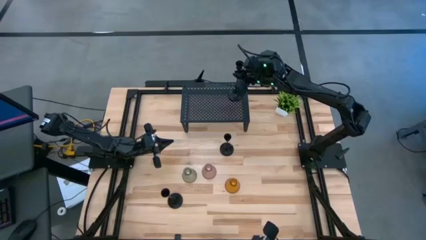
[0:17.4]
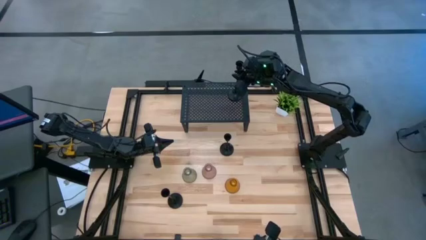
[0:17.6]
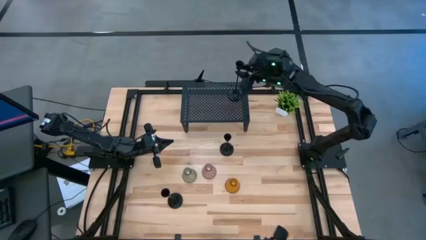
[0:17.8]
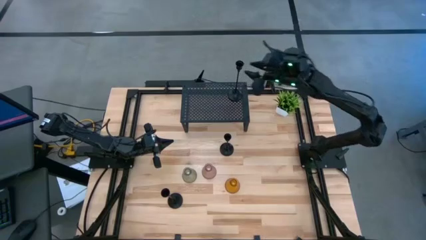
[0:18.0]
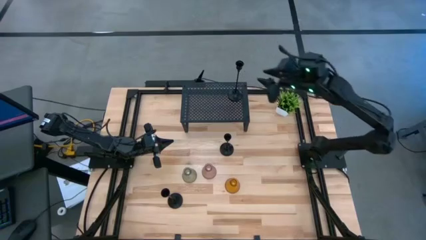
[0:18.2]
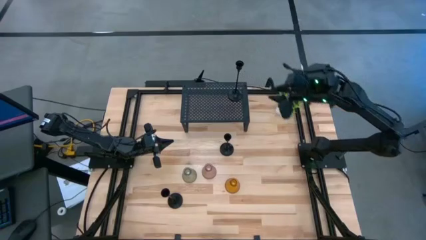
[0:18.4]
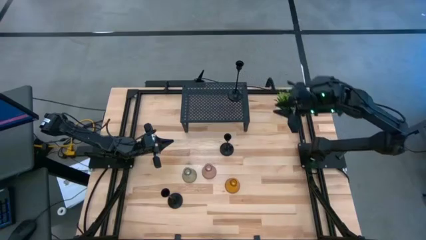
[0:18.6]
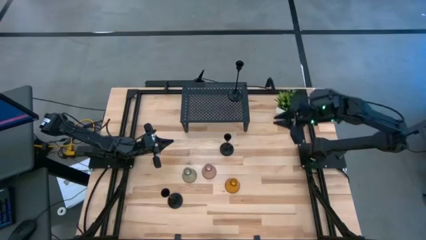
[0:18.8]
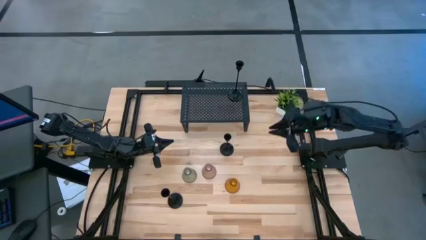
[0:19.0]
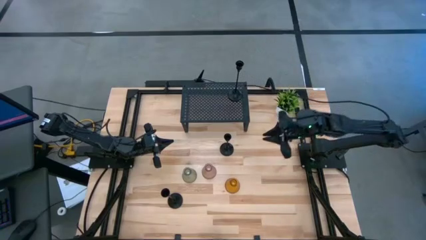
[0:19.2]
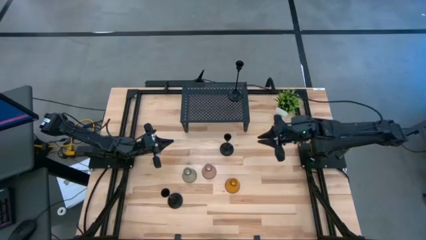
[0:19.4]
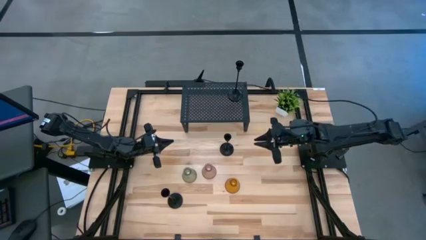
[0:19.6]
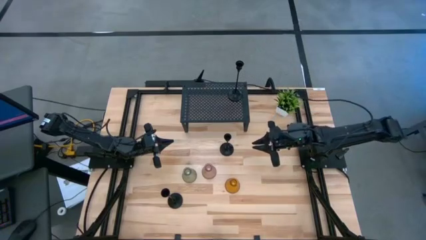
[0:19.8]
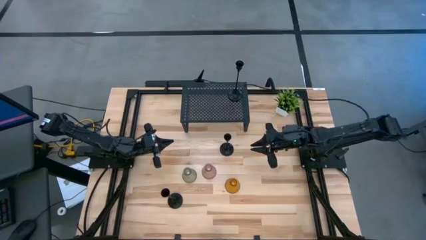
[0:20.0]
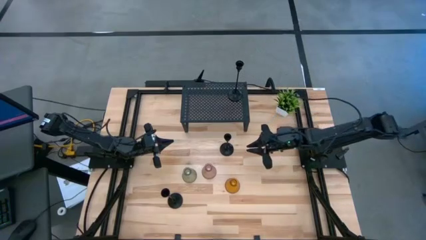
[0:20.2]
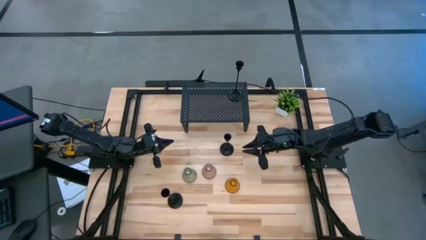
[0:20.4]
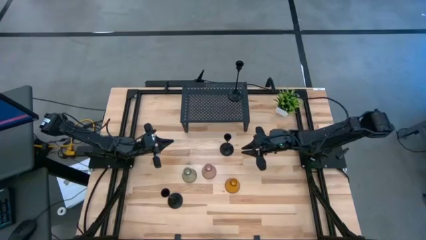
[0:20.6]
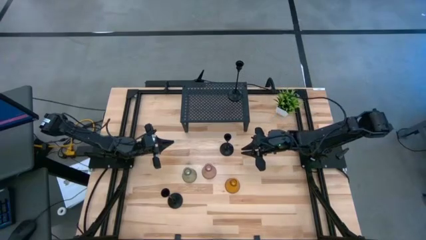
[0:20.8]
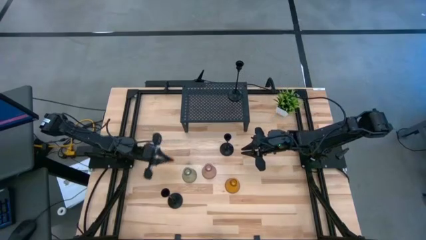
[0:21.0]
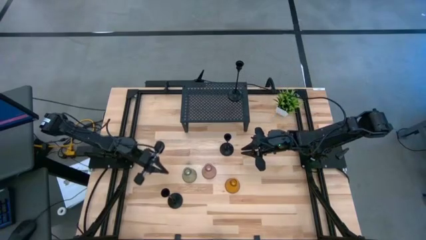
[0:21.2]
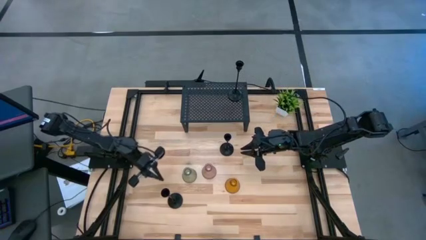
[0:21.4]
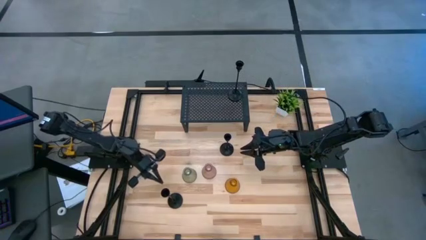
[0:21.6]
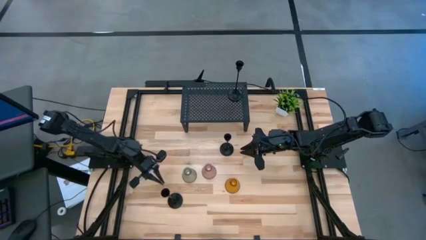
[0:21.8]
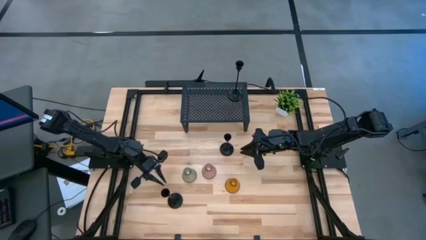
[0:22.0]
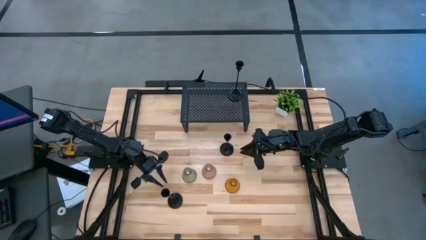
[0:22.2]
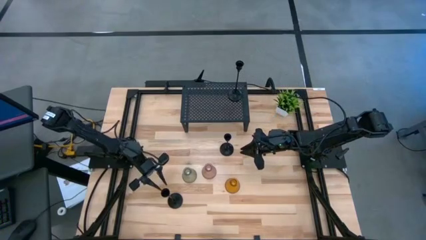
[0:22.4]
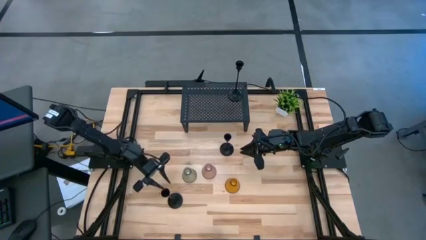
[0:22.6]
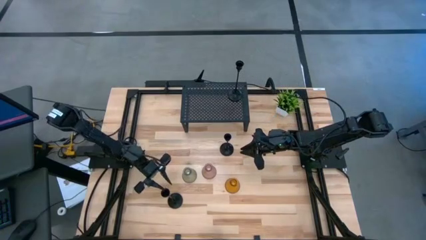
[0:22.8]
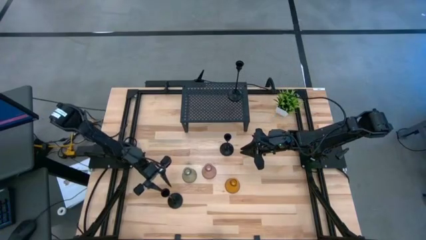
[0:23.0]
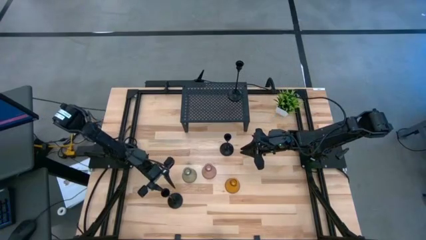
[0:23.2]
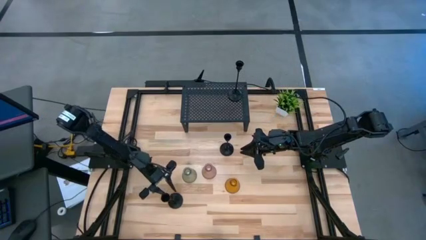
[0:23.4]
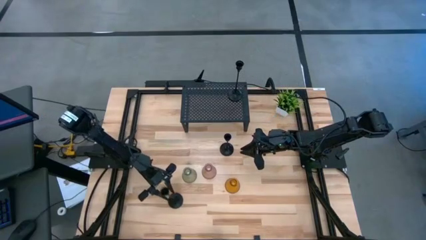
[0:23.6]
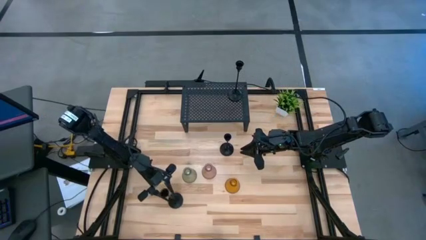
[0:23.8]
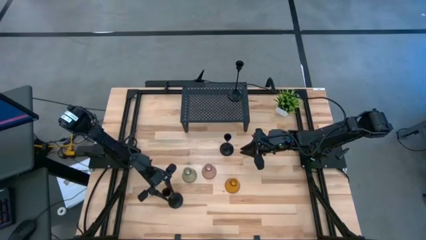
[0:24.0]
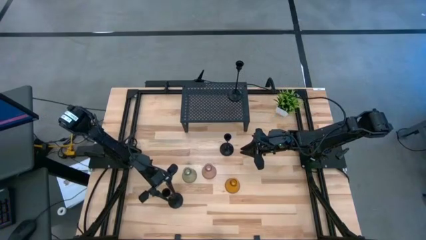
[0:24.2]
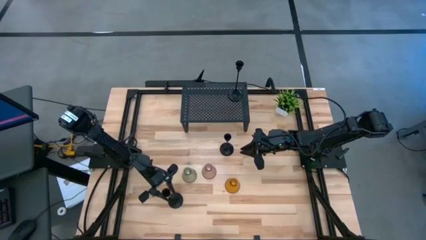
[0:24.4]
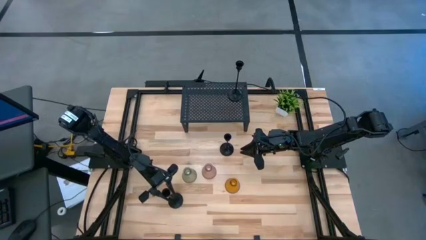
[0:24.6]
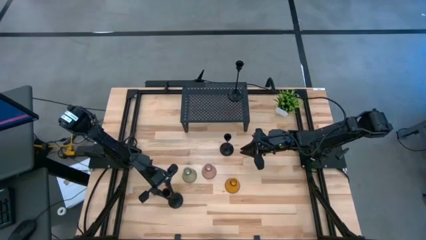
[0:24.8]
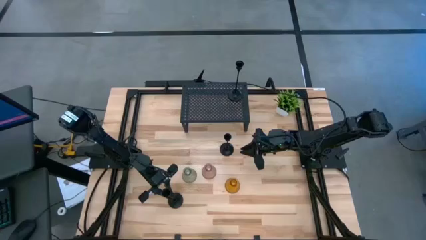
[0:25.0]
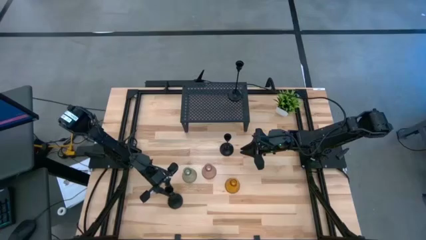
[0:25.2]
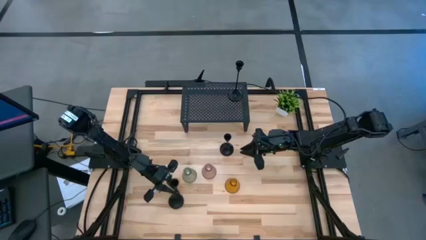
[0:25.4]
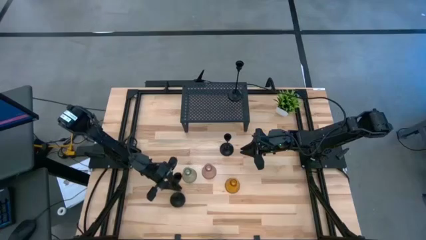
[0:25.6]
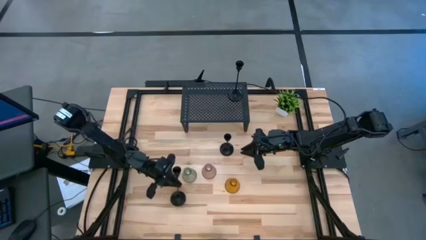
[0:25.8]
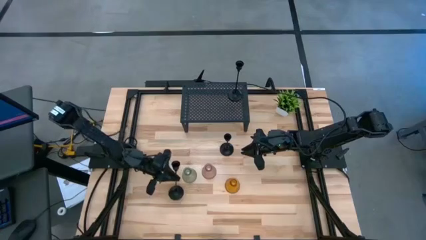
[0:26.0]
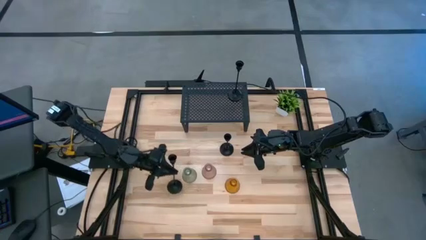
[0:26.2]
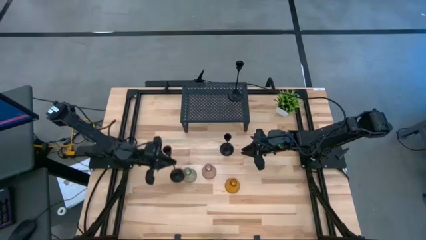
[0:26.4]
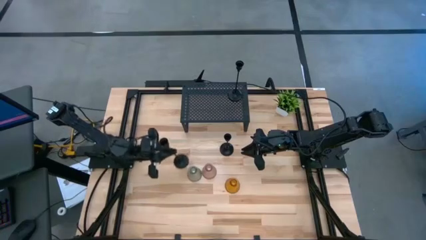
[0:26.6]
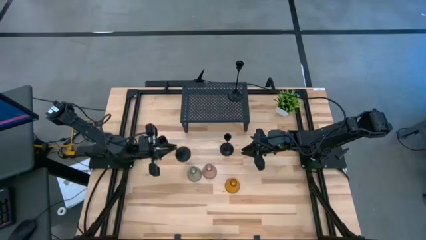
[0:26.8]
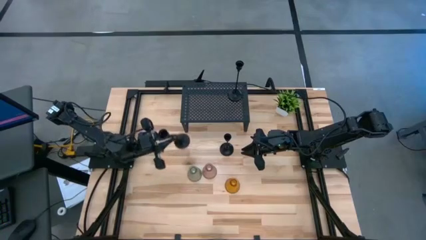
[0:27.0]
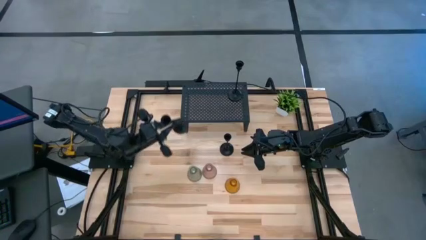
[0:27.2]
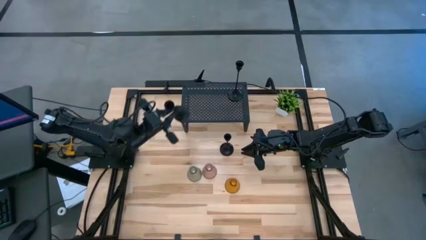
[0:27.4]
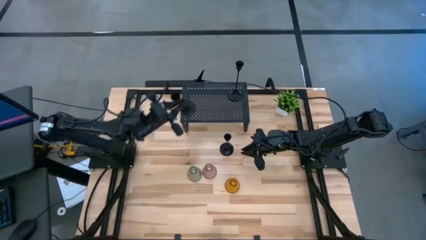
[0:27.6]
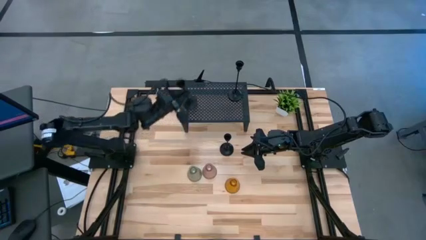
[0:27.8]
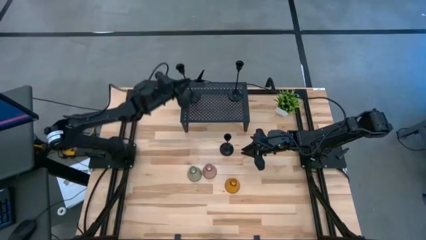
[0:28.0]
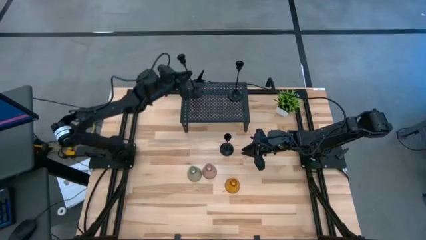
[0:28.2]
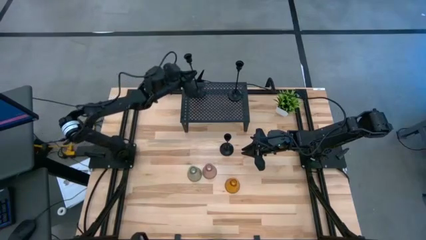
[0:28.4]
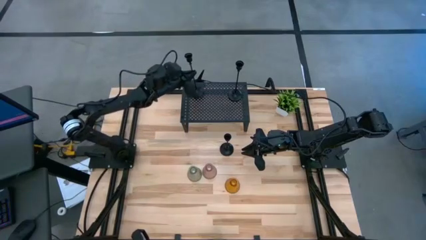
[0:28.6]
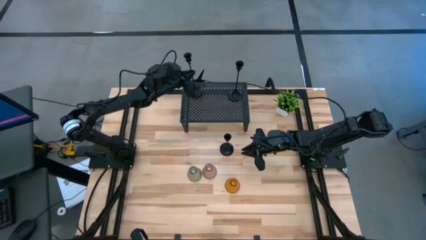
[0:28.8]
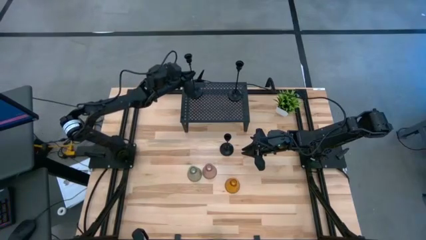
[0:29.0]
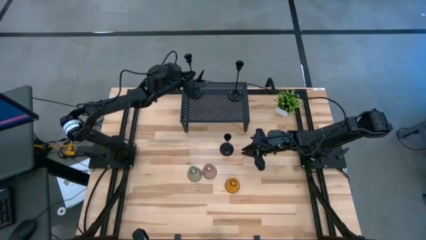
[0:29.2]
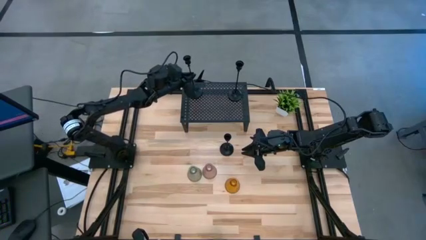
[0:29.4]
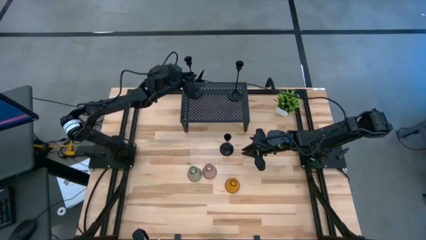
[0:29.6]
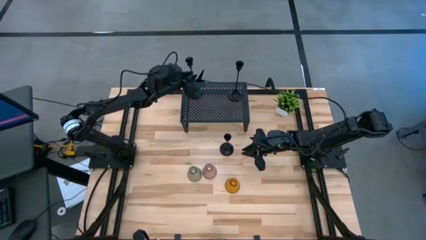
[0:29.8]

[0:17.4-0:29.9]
Task: Pick & Place candle stick holders
Put the bottom black candle holder on the shelf
